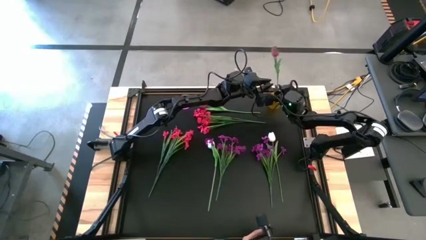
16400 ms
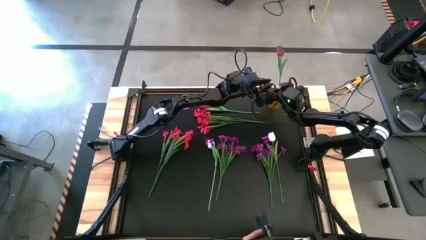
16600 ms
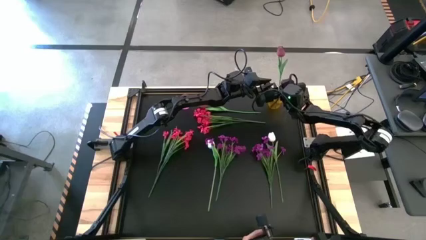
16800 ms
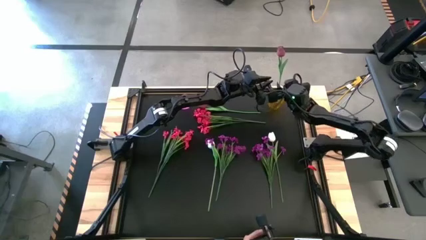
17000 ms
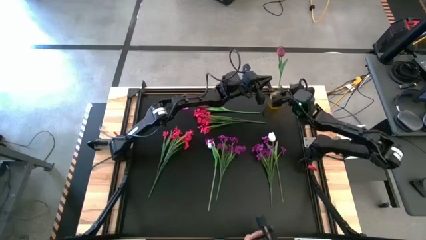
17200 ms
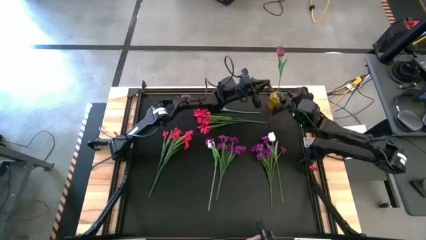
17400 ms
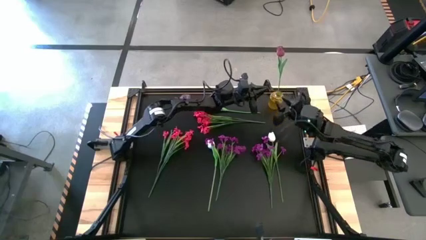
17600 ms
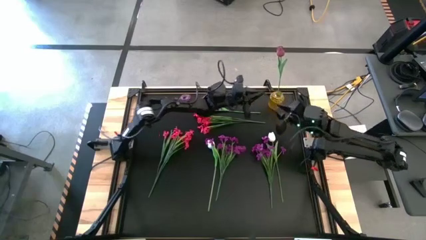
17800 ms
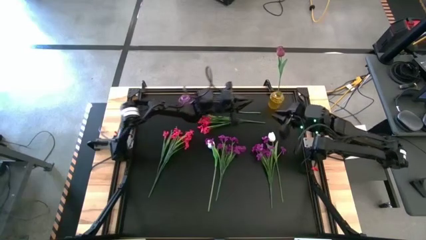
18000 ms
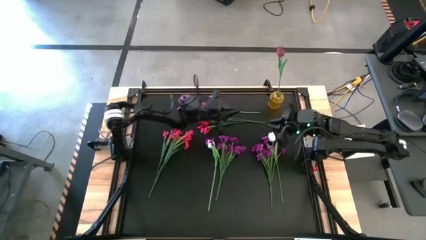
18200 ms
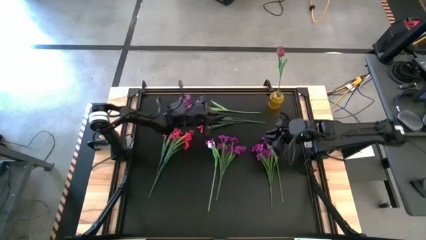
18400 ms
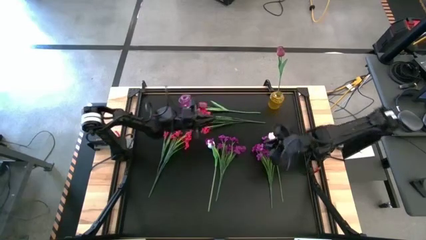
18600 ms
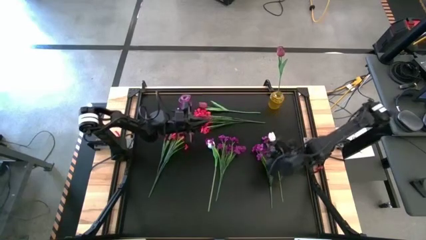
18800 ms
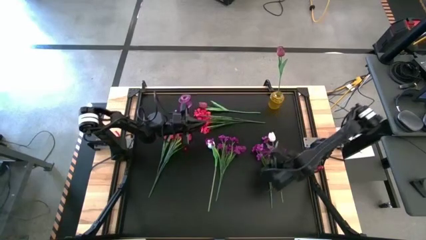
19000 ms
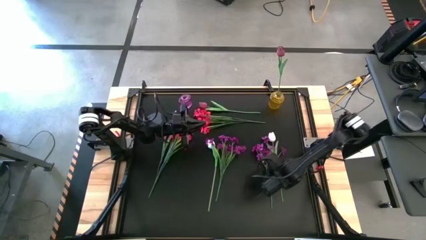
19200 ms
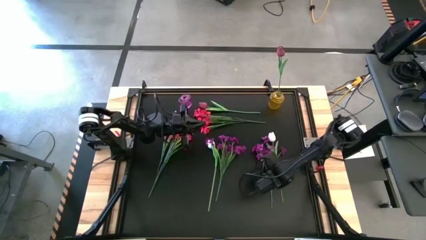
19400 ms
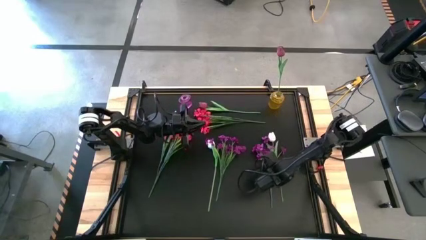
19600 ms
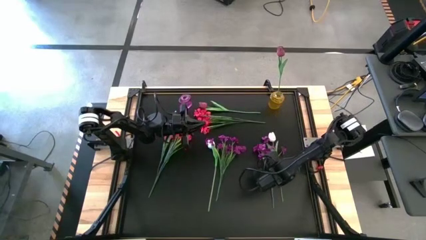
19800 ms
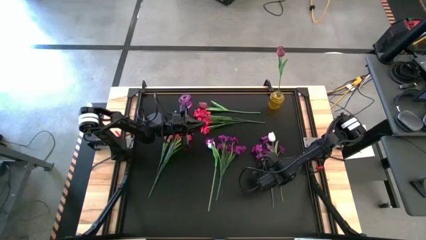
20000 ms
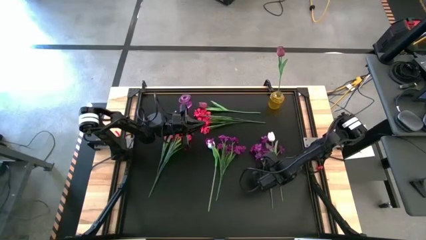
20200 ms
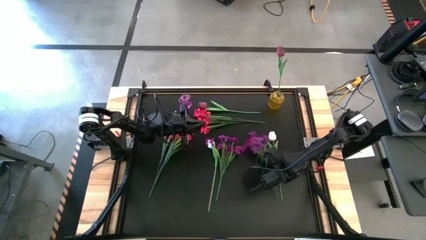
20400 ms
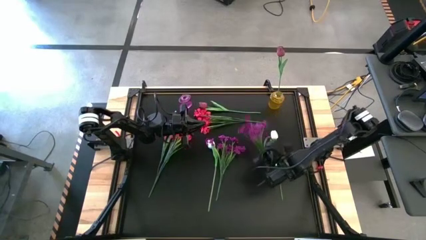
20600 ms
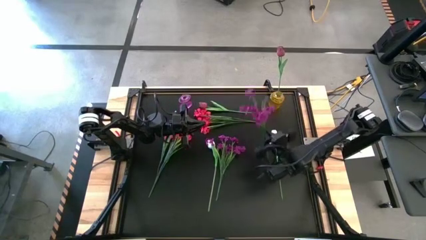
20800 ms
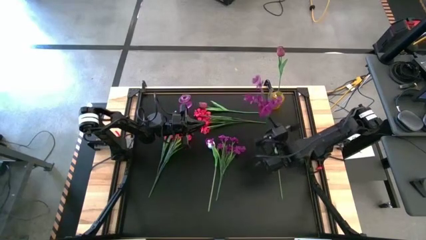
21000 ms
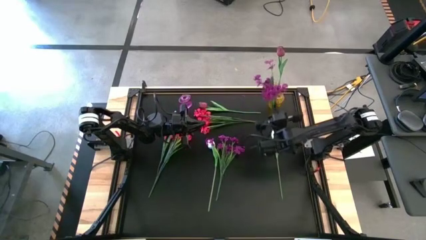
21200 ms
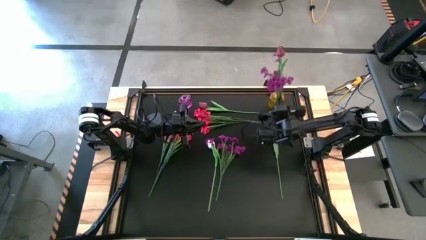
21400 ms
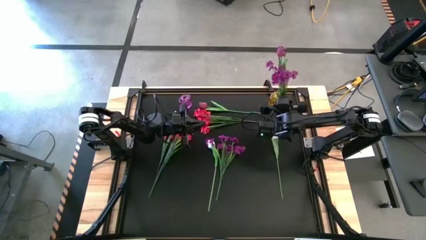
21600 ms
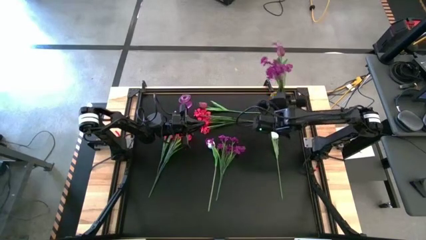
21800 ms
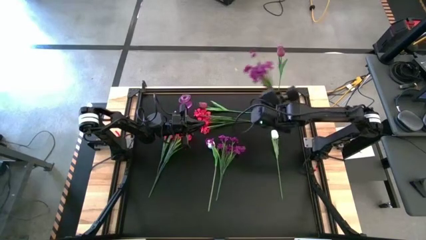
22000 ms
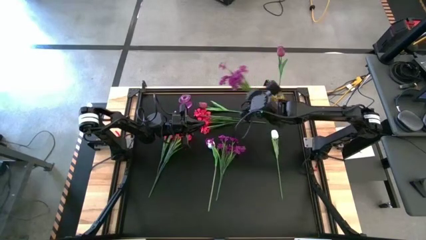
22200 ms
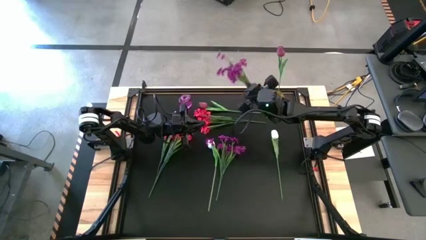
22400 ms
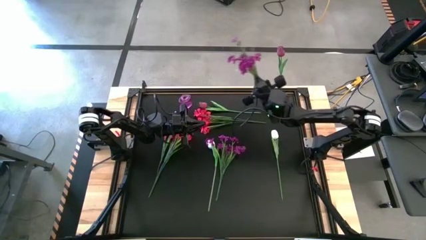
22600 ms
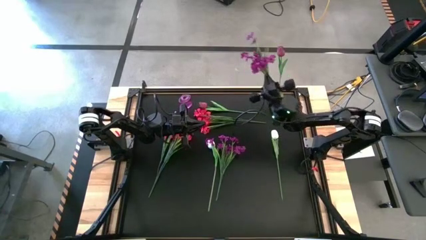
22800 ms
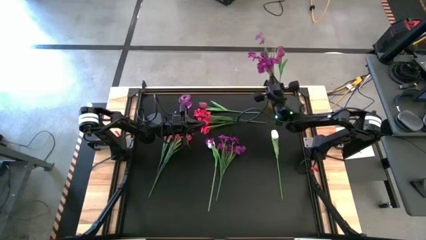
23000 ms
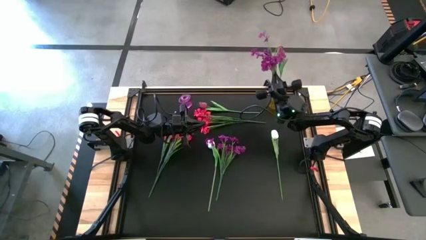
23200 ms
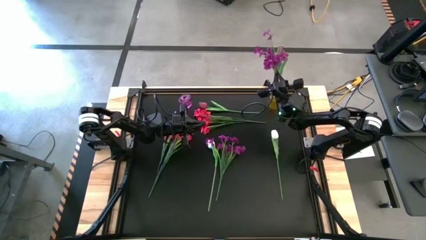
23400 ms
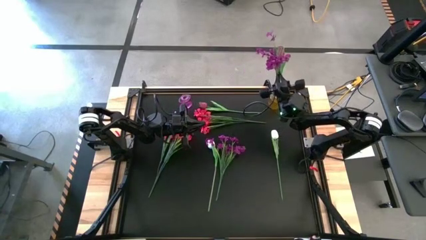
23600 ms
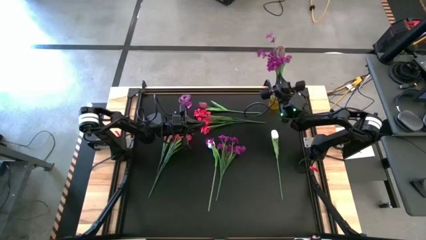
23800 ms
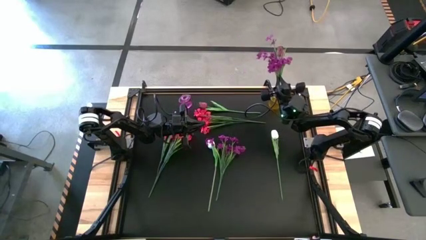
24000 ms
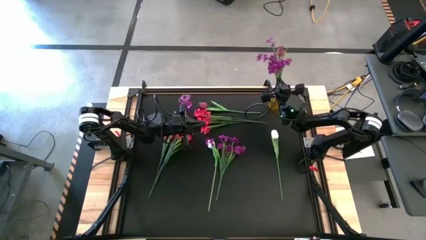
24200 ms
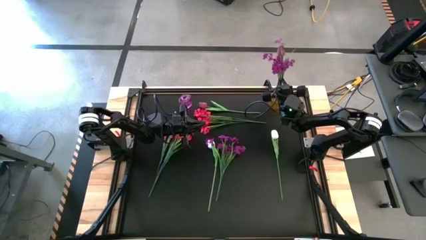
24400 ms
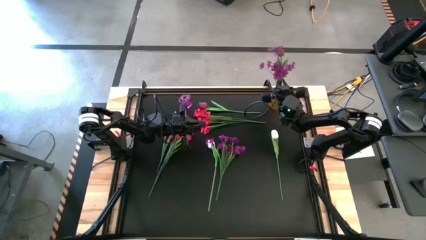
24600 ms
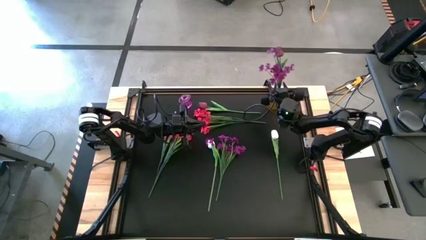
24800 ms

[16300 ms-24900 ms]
Task: Sort flowers into vase by color
Put the right purple flowers into the yellow vase

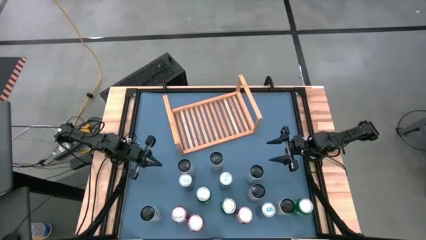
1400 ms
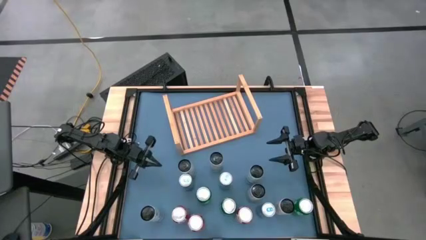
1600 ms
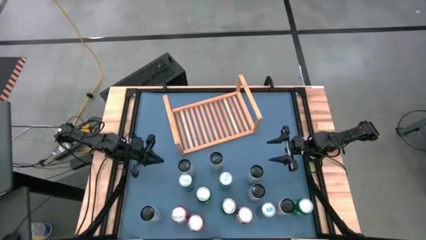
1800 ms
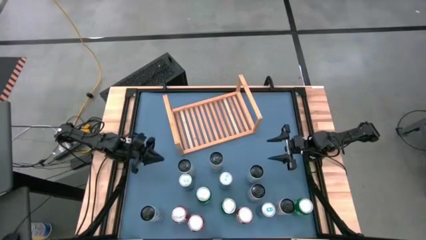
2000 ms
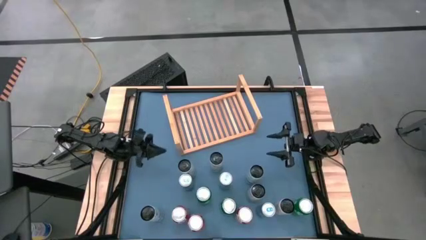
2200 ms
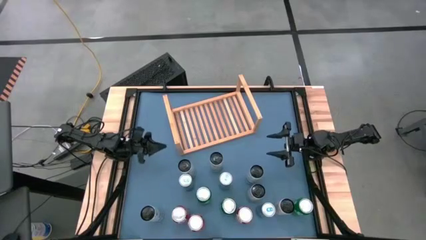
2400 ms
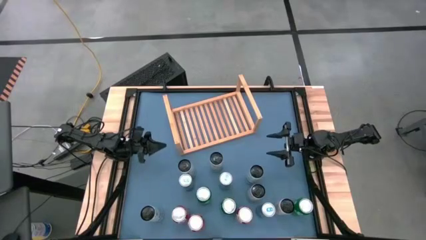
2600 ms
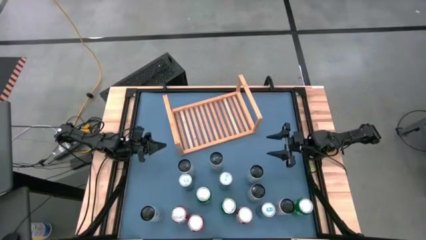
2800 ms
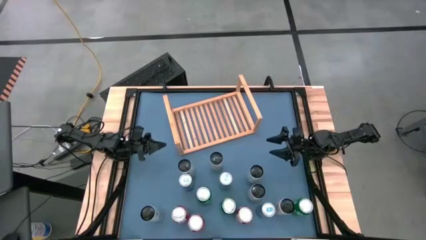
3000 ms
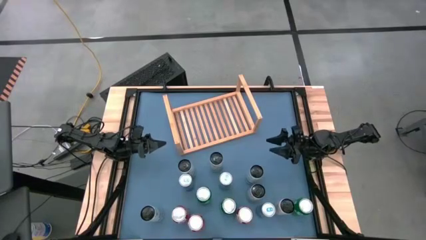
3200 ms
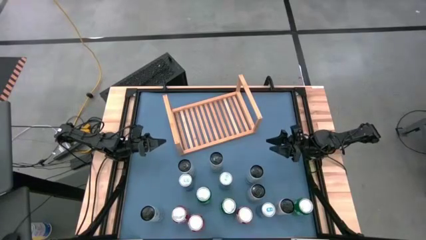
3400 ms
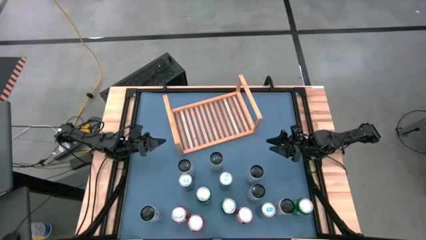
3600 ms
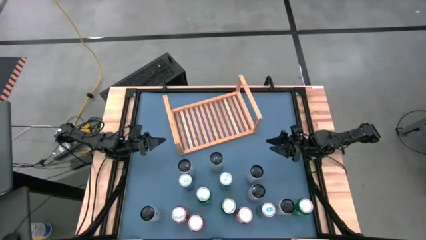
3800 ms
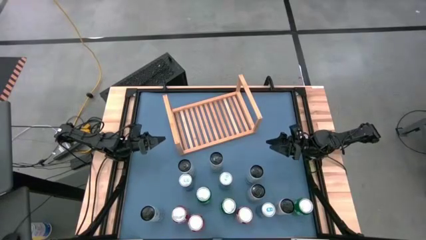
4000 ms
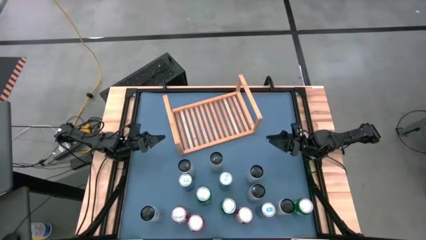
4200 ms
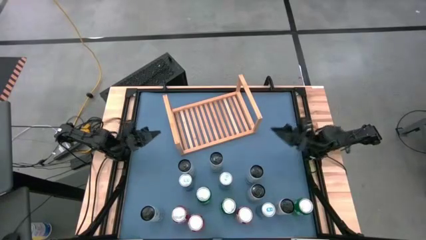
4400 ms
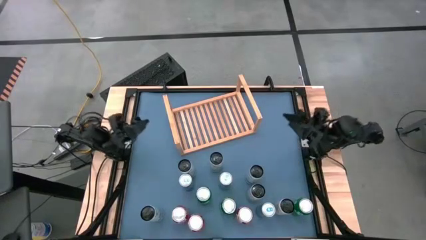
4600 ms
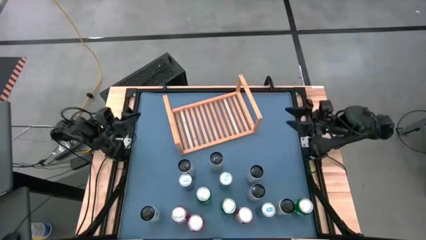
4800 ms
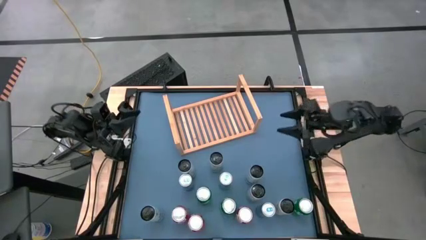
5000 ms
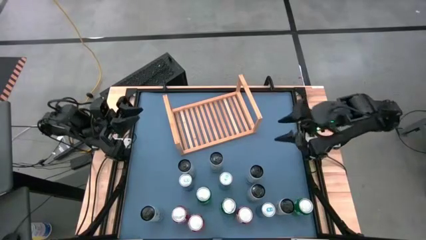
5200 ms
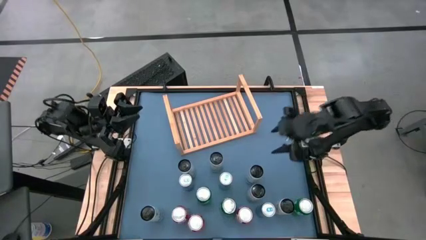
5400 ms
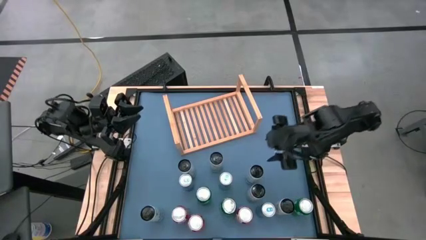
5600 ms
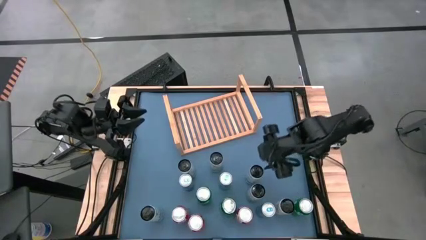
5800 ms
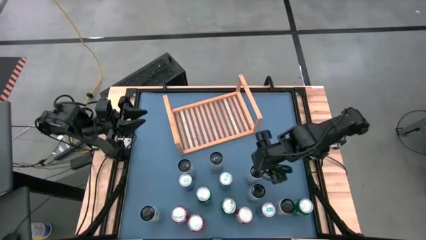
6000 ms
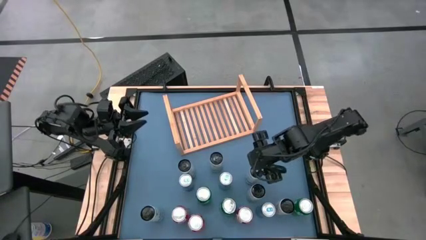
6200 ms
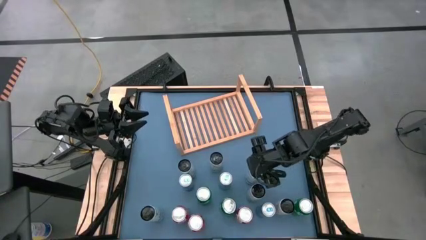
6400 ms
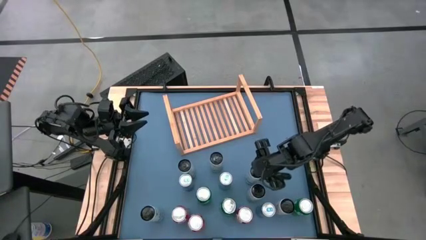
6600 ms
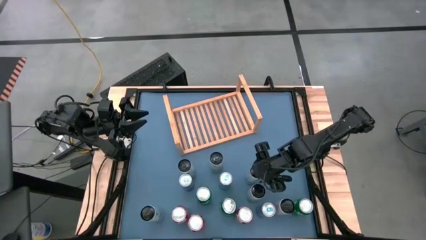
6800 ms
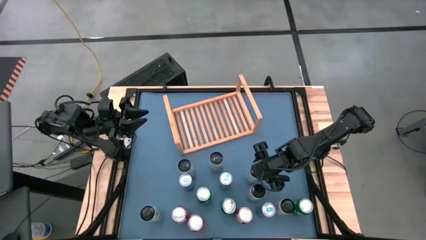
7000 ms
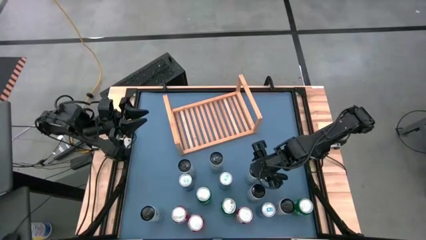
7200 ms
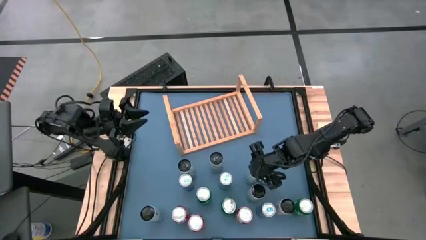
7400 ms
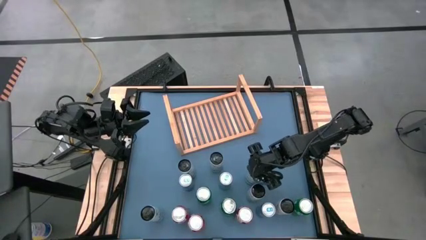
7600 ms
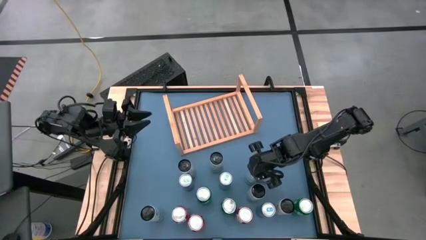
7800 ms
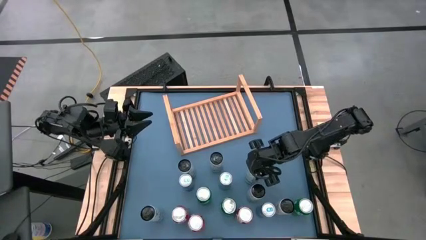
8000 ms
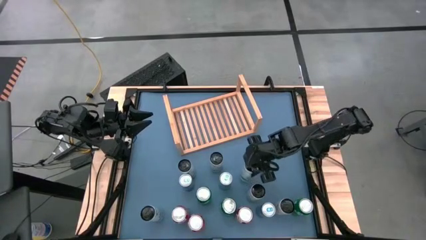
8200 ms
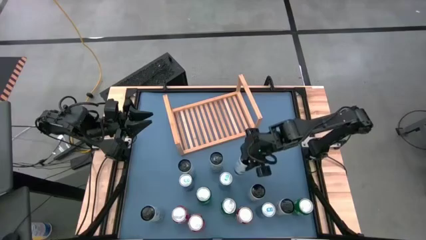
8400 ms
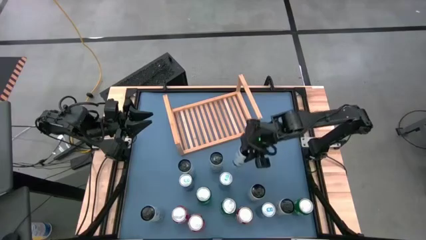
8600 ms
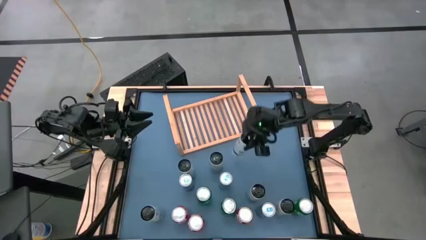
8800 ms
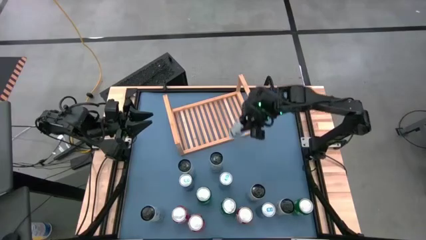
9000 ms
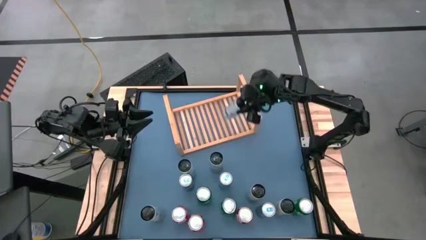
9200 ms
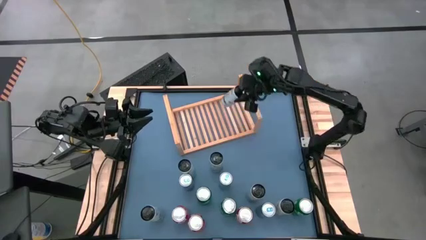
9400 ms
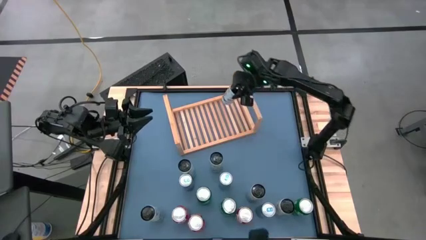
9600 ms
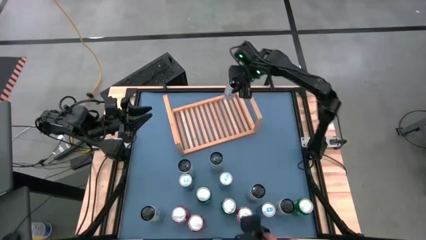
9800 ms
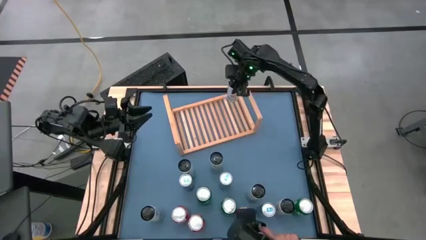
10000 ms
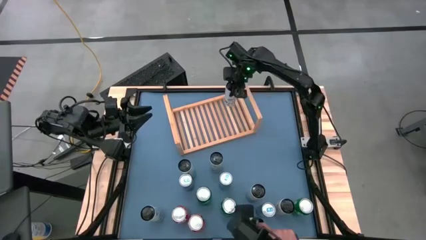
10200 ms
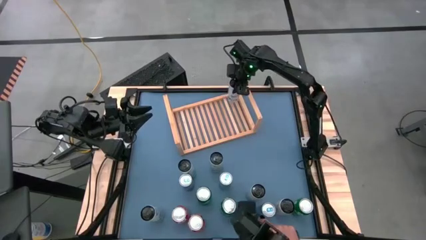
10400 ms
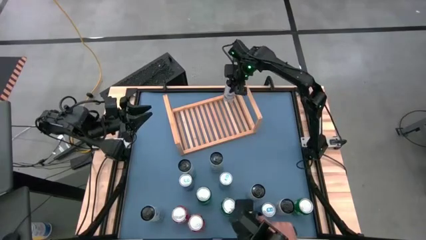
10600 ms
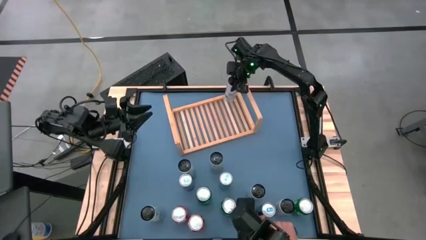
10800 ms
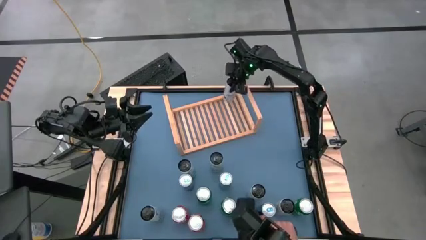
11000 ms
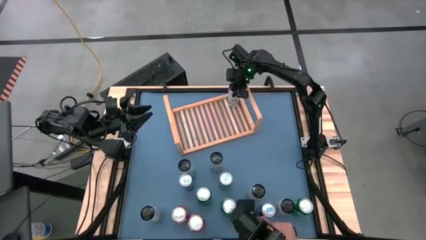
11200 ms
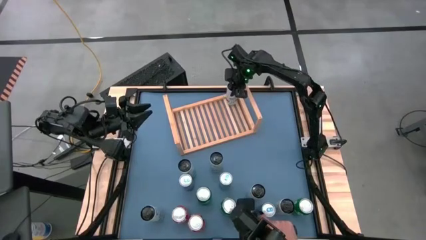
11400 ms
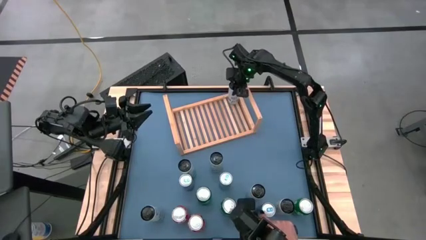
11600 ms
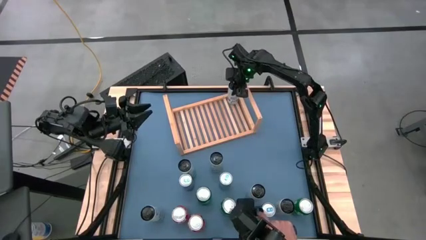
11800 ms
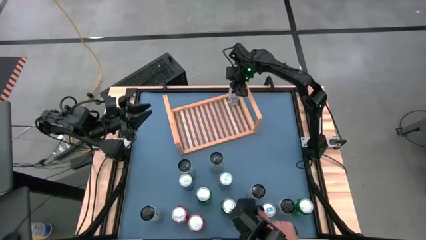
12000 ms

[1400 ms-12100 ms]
Task: Place canned beverage on shelf
Put the white-blue soda can on the shelf
